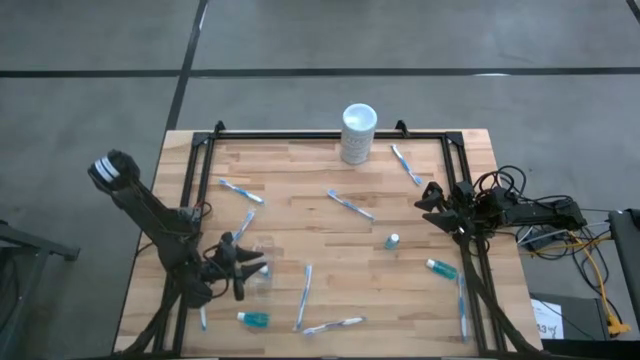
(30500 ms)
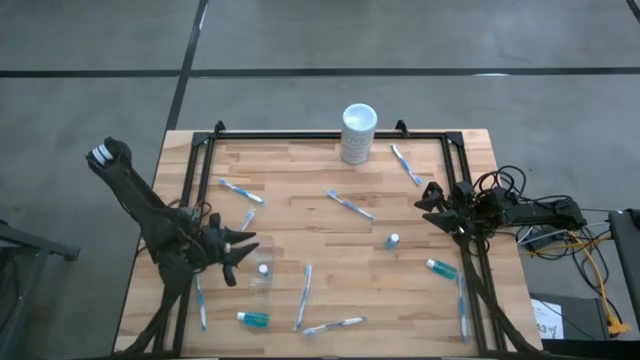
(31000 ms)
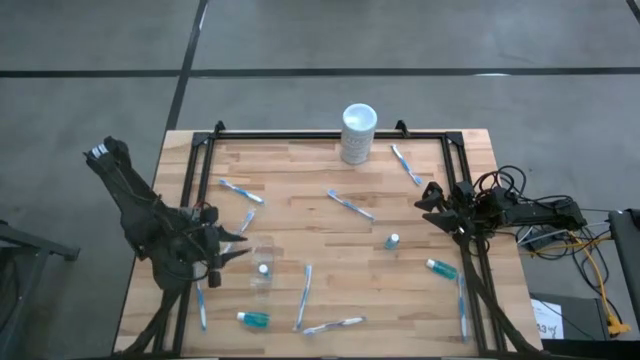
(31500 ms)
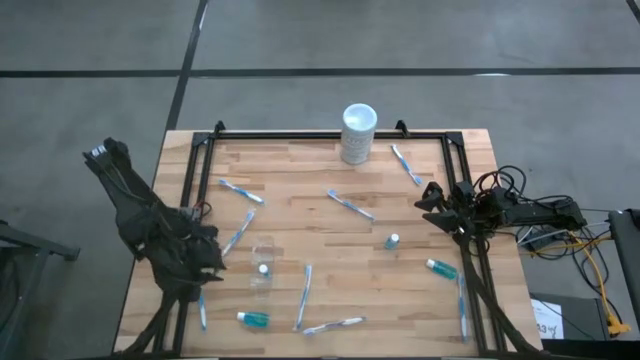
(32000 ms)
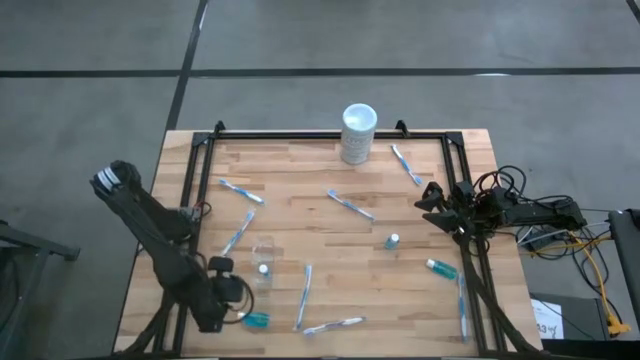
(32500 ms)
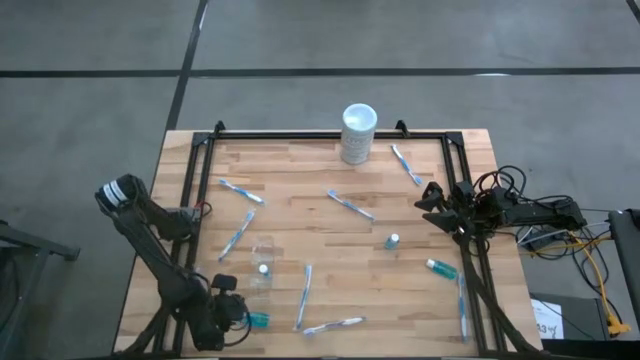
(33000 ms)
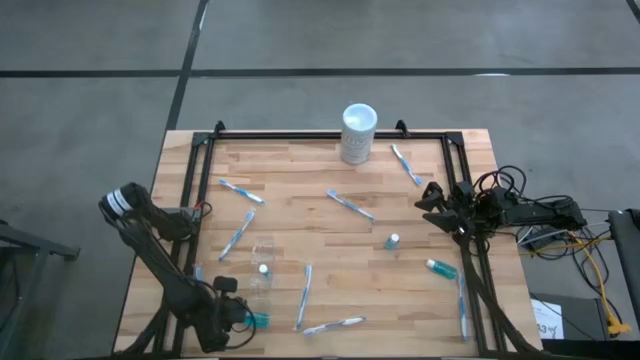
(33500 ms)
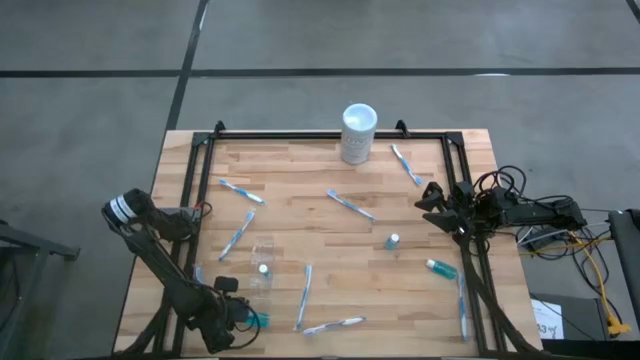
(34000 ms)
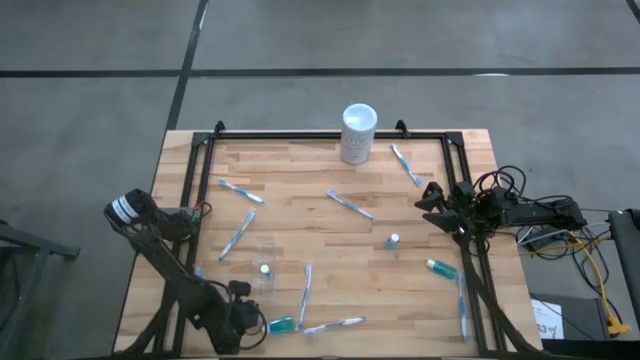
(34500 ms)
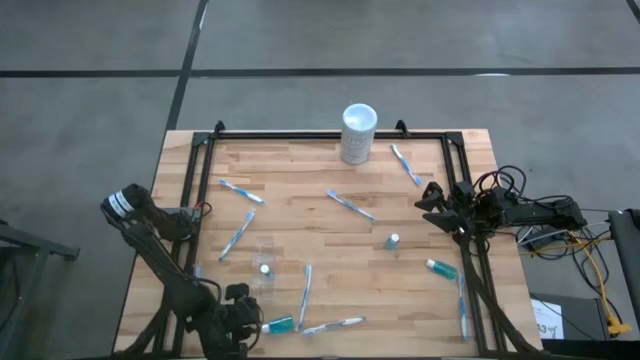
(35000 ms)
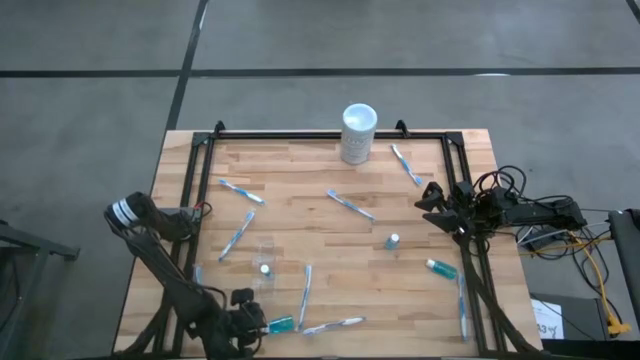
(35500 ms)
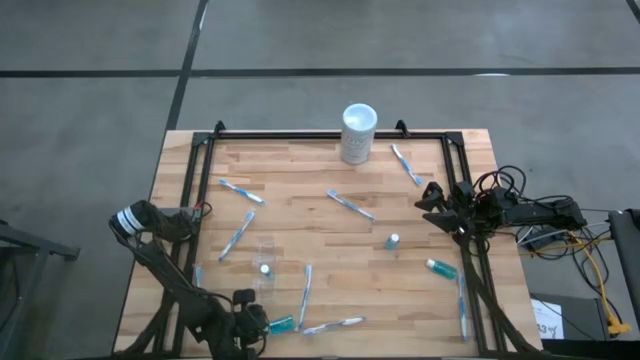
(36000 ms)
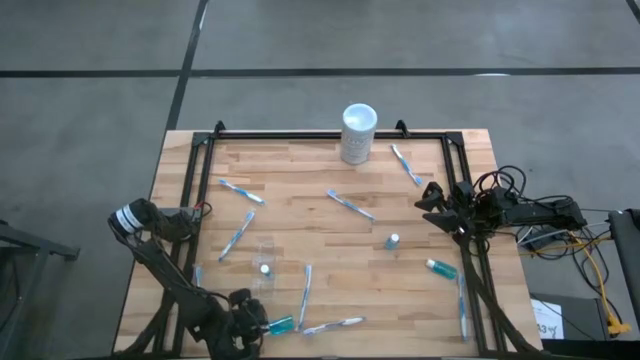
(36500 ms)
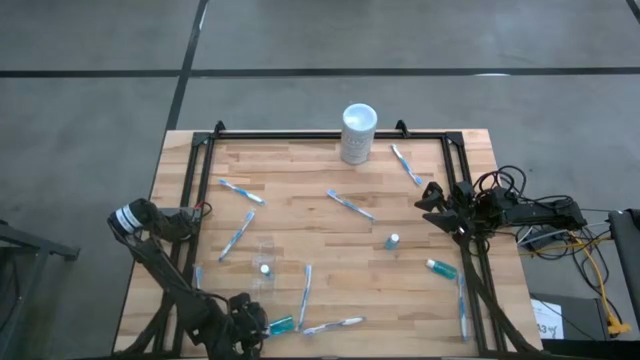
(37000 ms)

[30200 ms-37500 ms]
Task: Pick & Place toothbrushing station
Put the blue mouthwash bottle into the transparent organizer

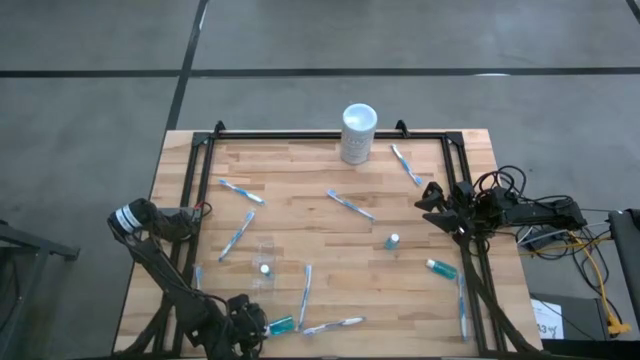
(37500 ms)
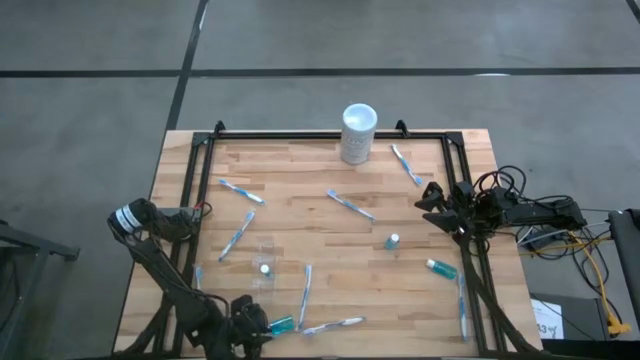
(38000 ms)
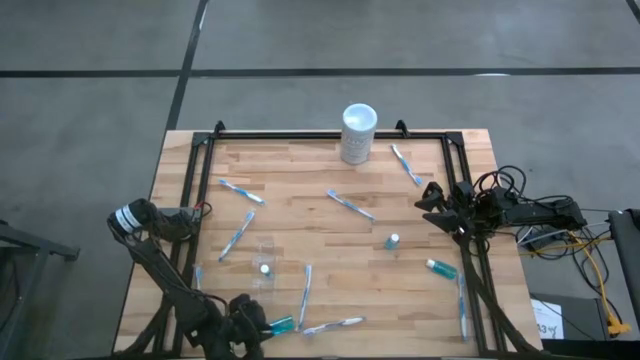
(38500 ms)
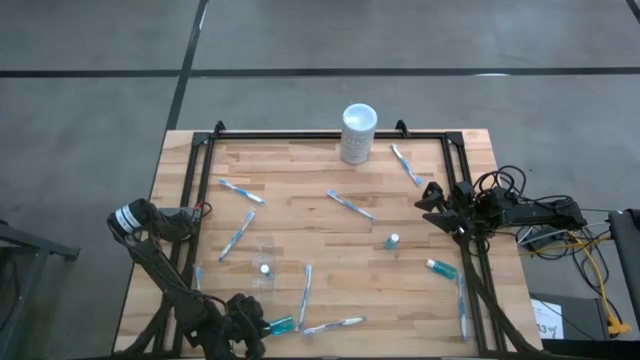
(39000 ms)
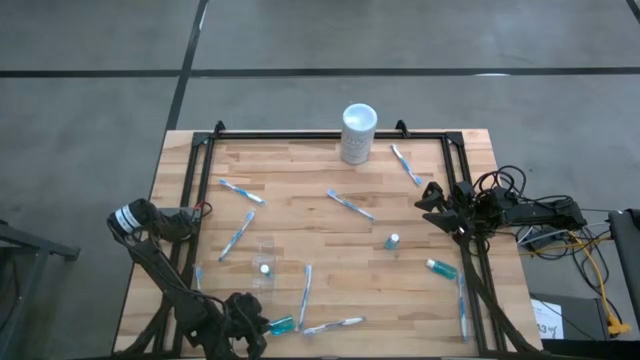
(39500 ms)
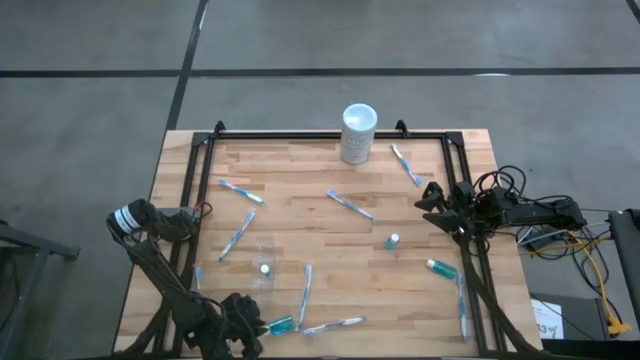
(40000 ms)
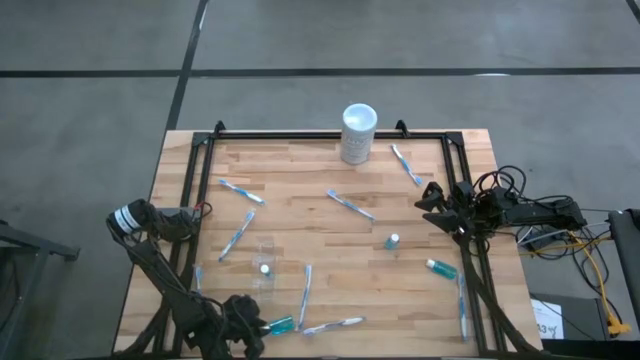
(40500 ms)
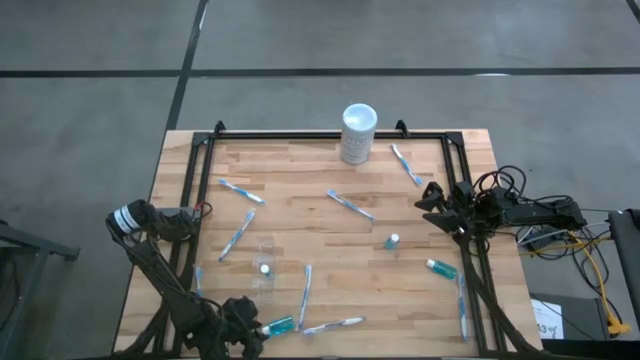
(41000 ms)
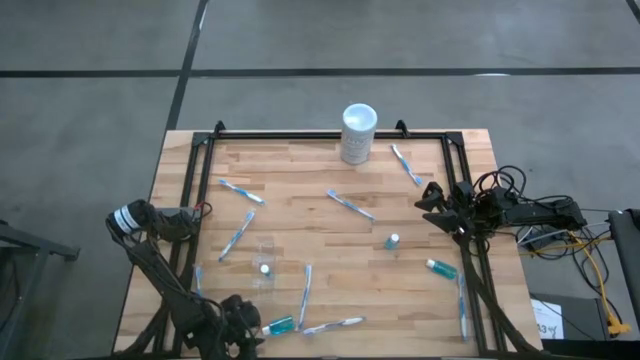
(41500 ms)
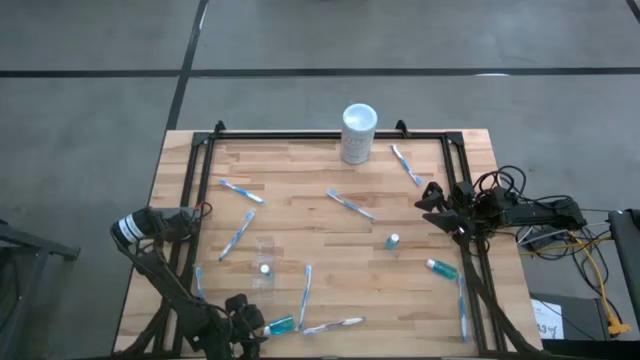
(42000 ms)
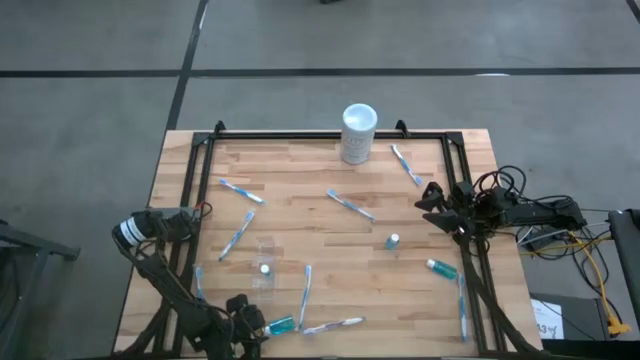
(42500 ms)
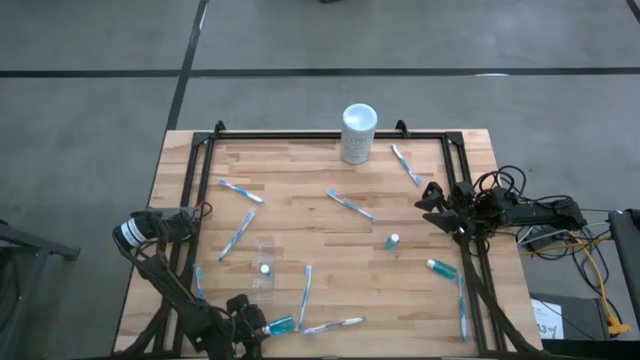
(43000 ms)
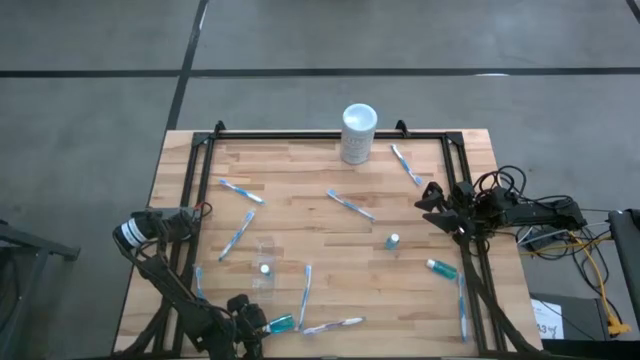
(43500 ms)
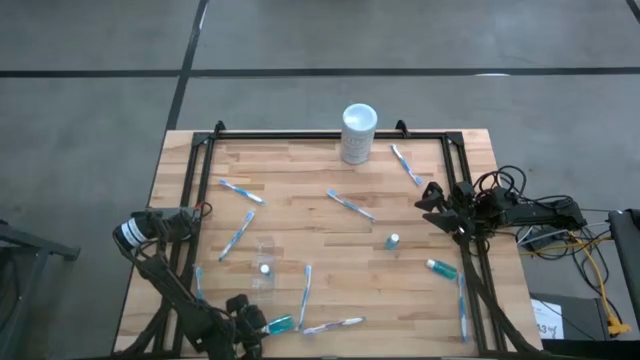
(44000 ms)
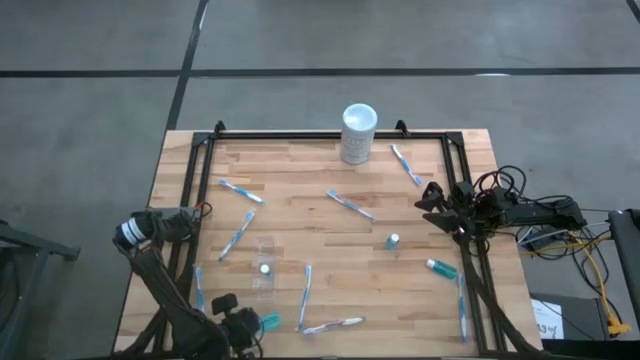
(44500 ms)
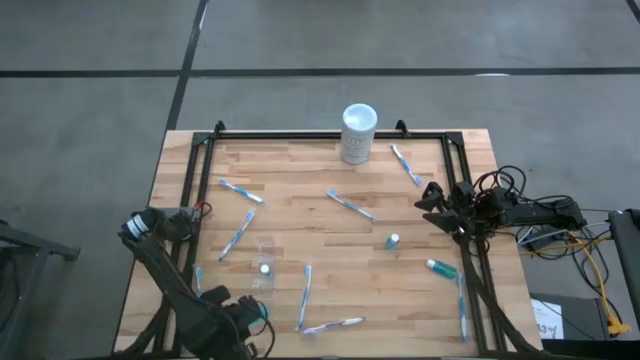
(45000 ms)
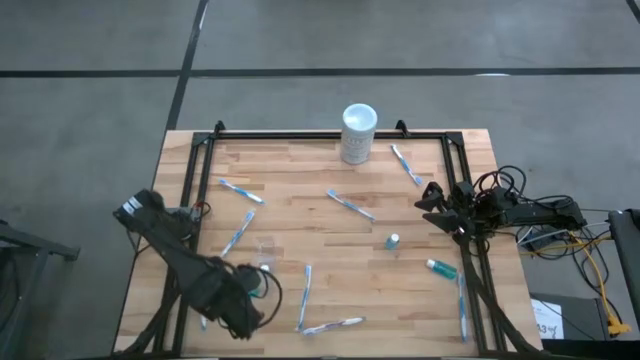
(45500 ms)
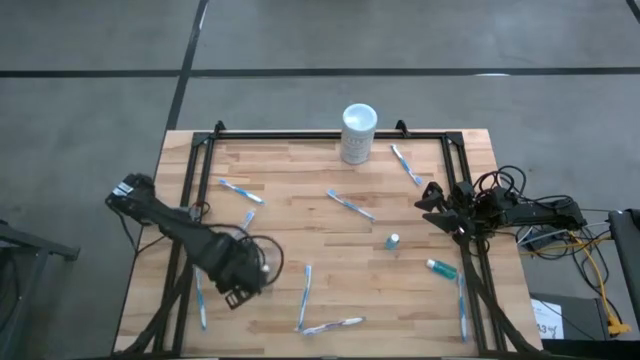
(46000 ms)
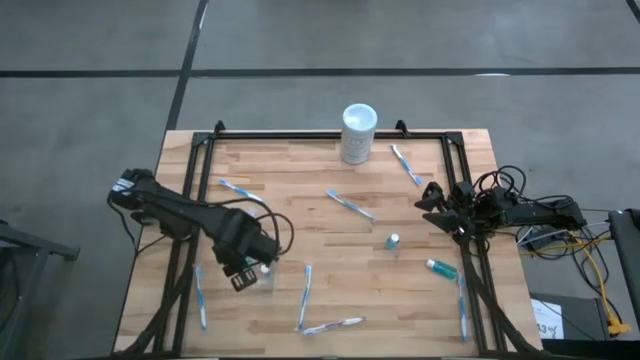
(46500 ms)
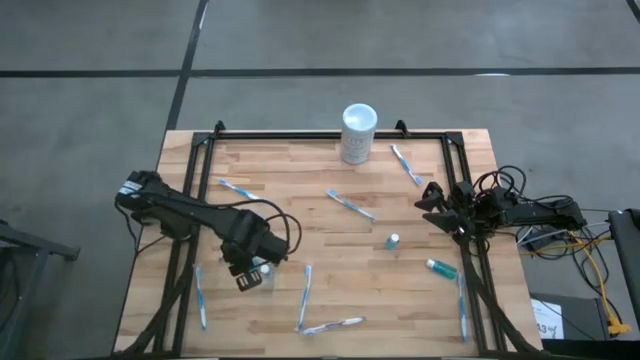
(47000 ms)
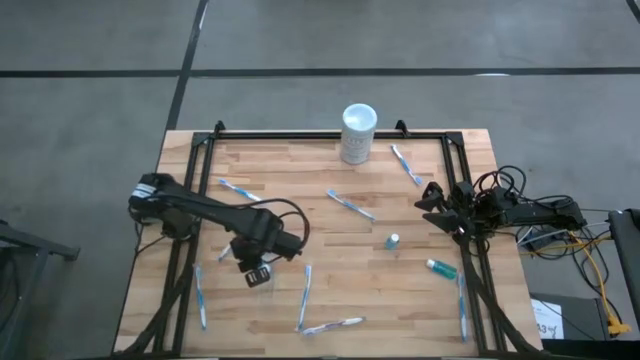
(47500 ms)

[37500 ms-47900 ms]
Put the blue mouthwash bottle into the transparent organizer

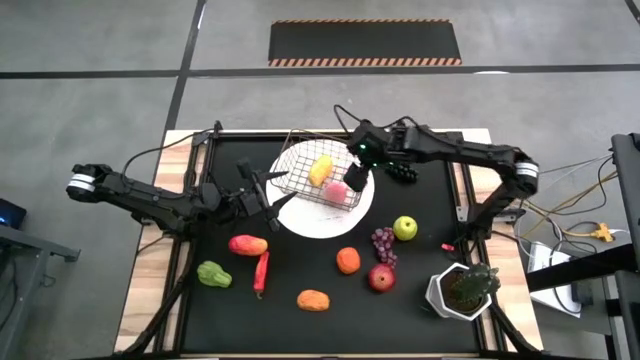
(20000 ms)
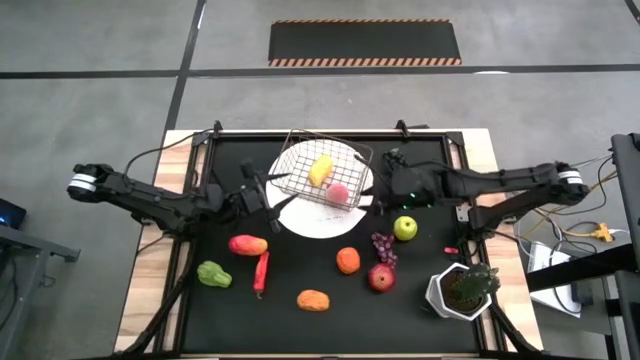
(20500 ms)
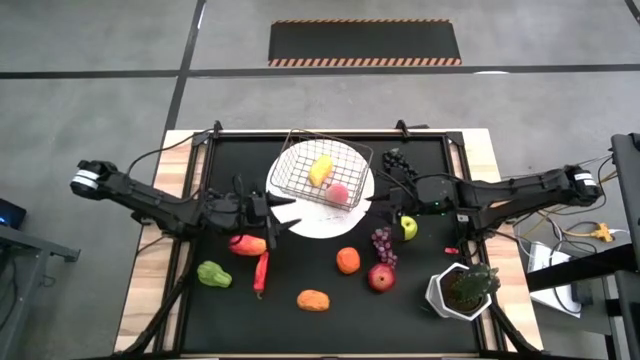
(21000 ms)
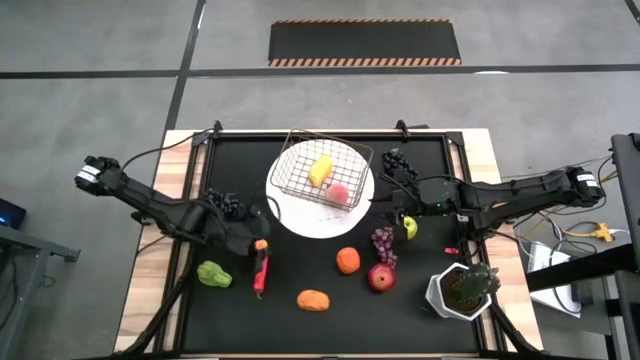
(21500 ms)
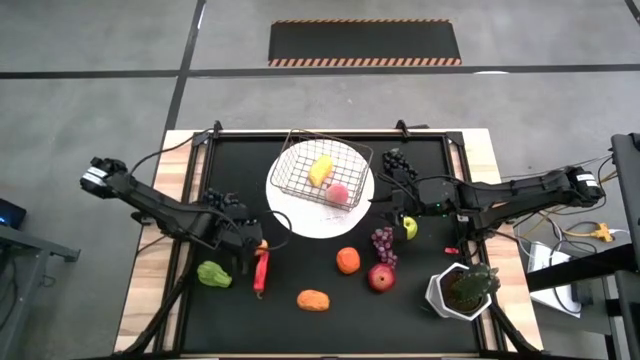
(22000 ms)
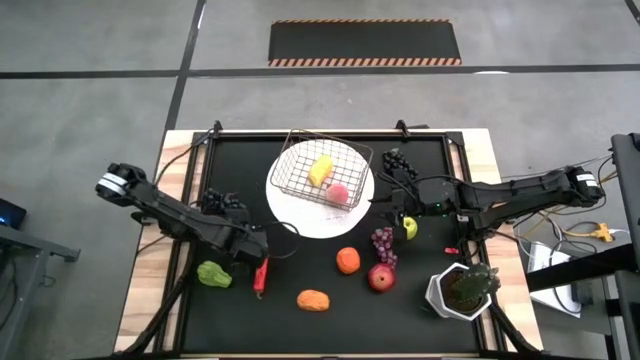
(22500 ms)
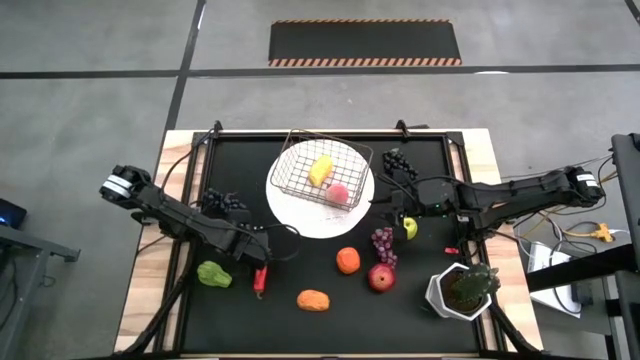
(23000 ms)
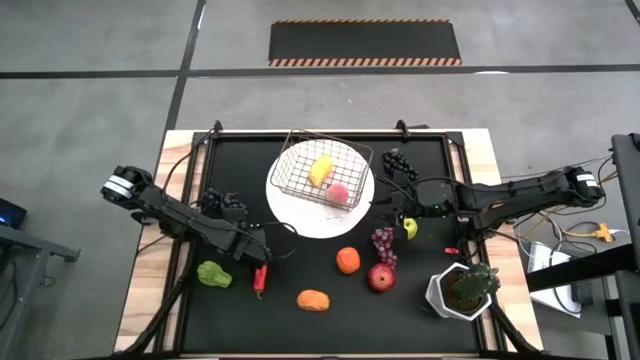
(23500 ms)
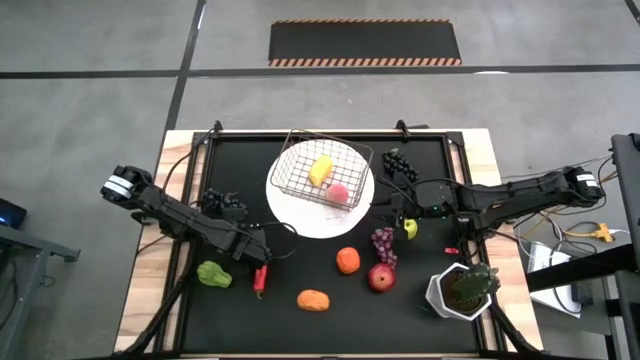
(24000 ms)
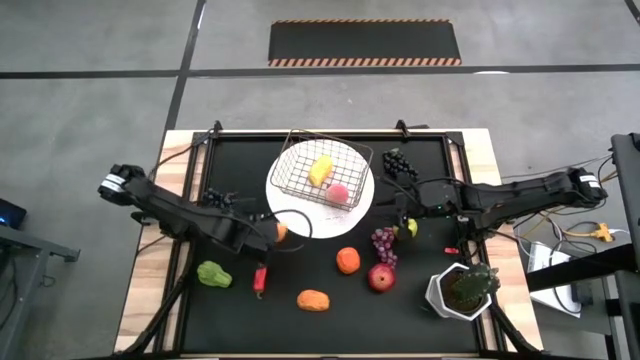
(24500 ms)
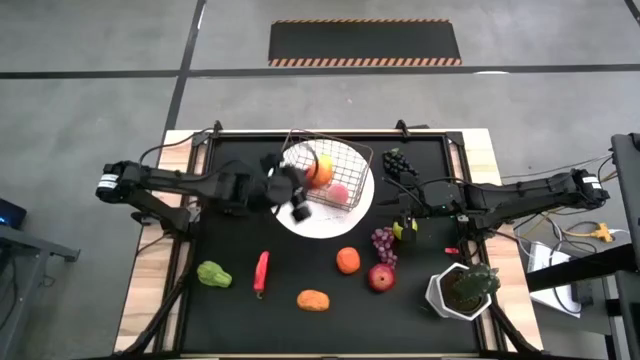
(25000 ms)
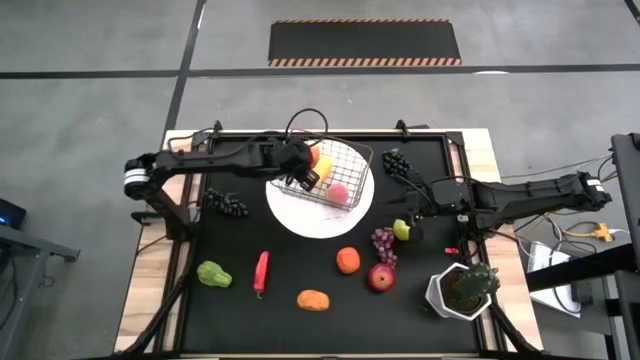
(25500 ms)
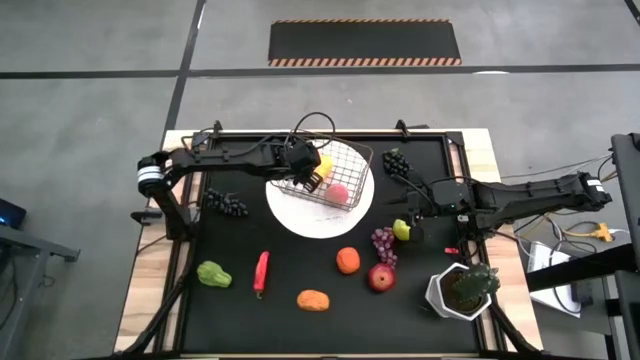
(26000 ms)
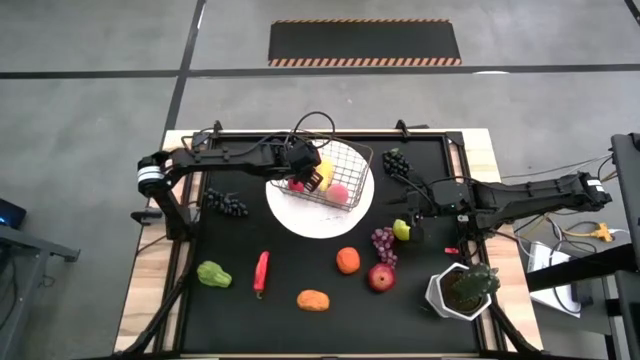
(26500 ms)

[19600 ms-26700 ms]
Task: Build produce basket
Put the red mango into the silver basket
